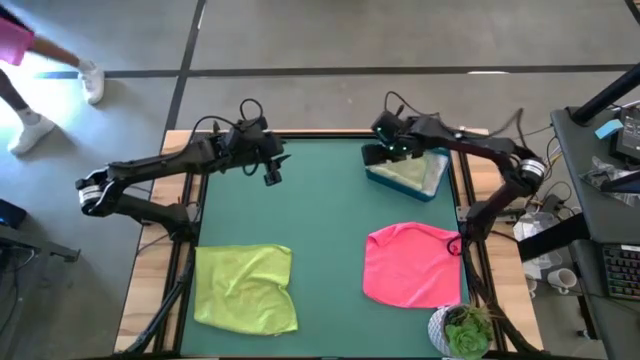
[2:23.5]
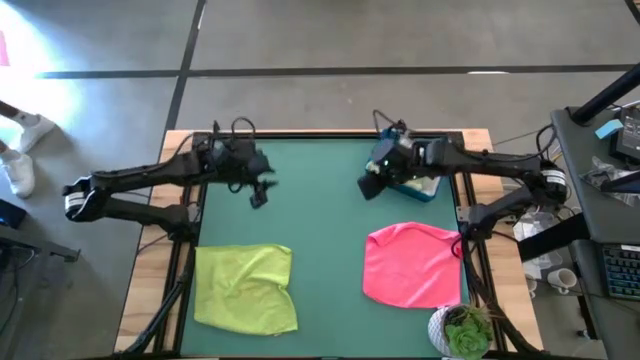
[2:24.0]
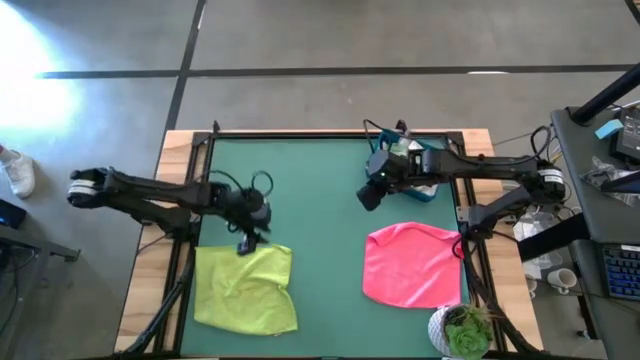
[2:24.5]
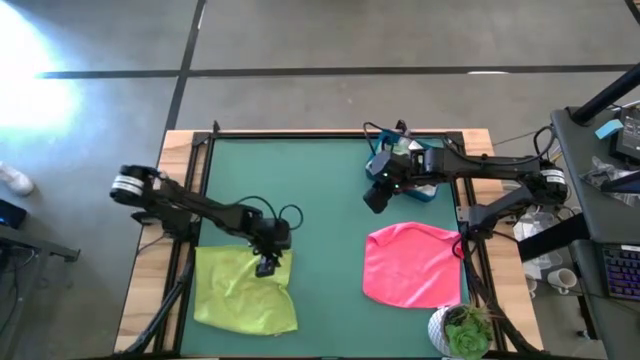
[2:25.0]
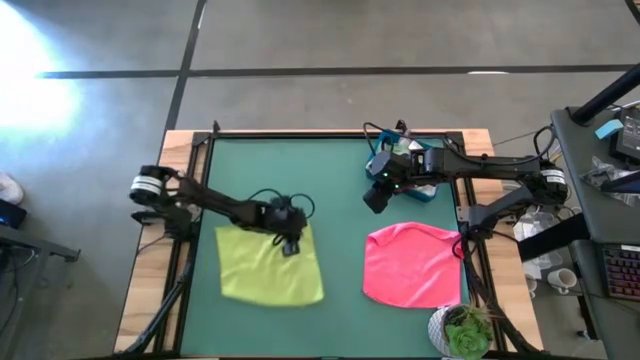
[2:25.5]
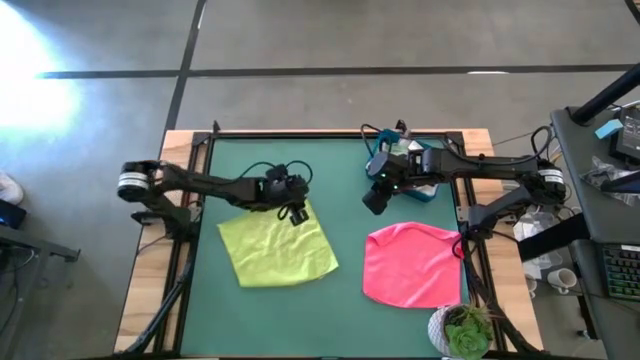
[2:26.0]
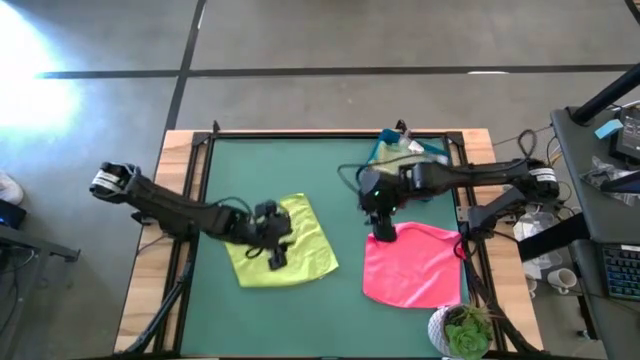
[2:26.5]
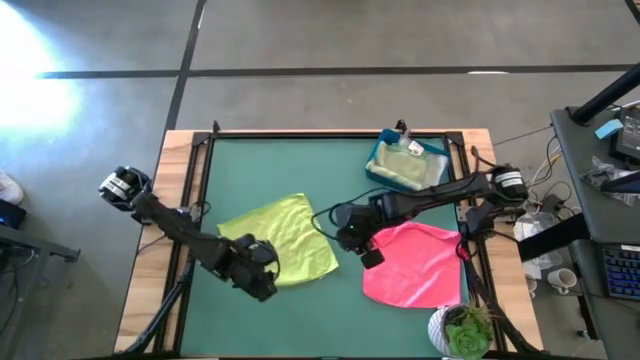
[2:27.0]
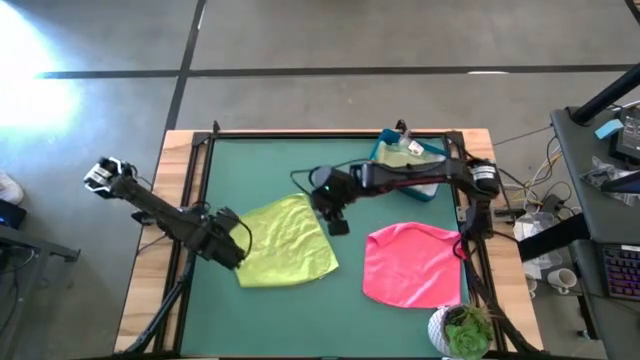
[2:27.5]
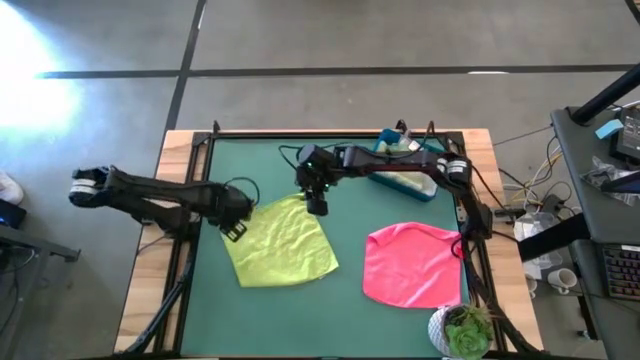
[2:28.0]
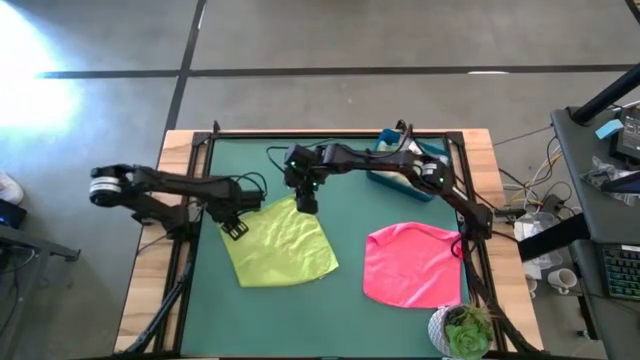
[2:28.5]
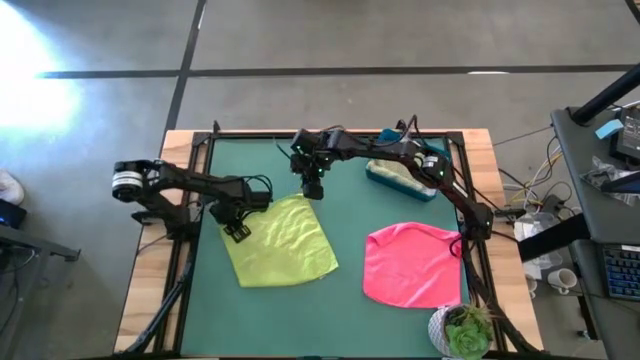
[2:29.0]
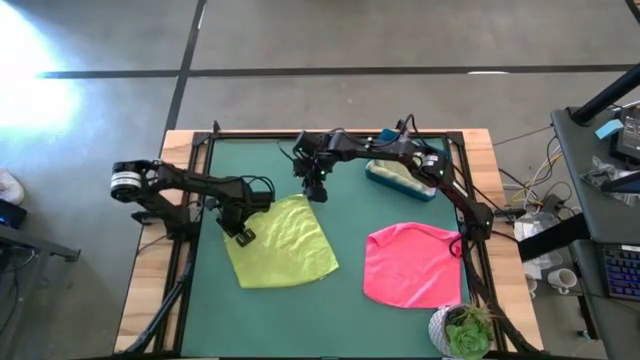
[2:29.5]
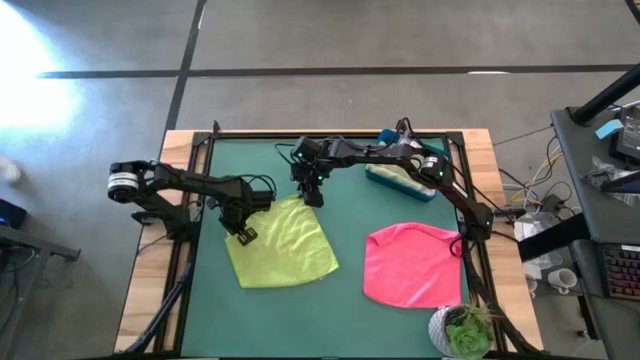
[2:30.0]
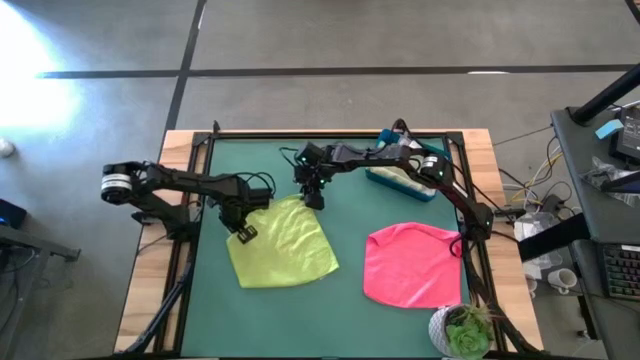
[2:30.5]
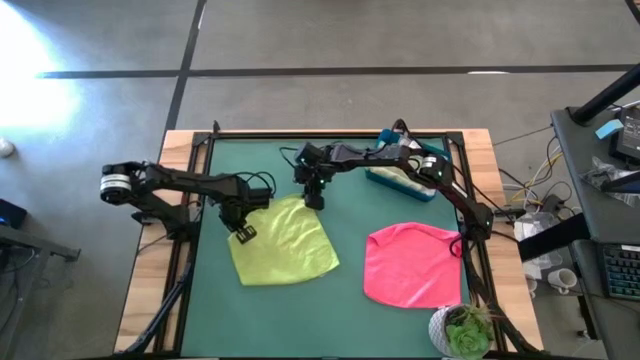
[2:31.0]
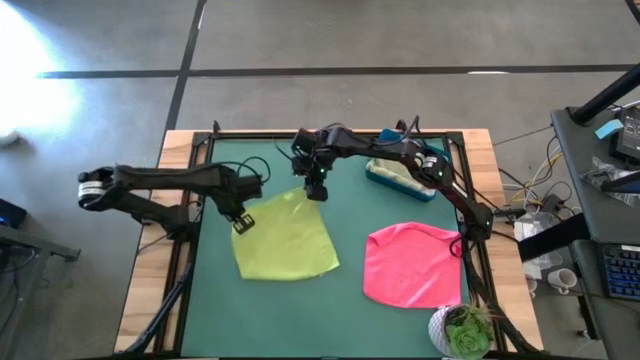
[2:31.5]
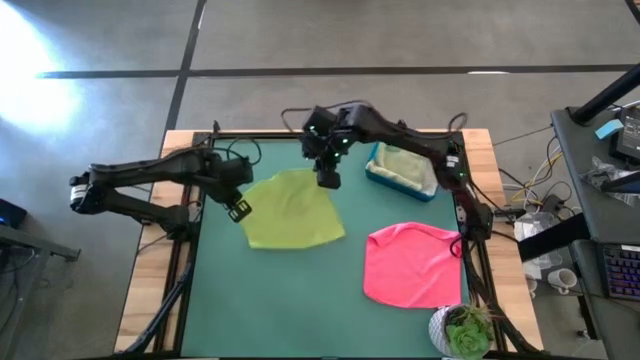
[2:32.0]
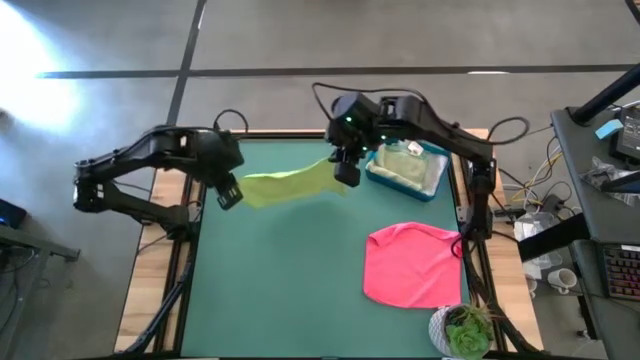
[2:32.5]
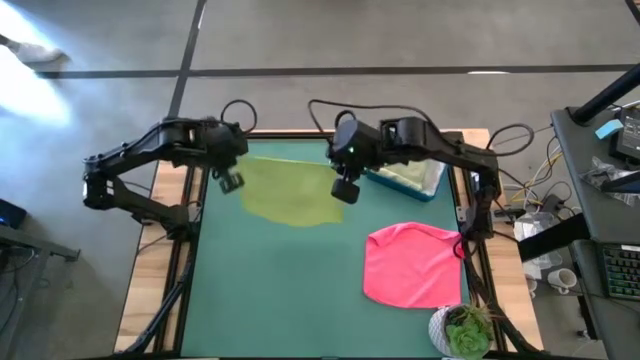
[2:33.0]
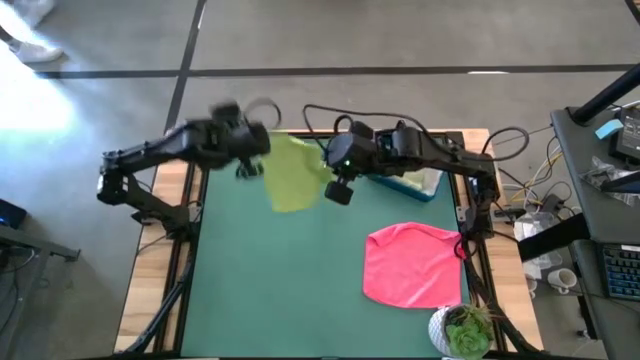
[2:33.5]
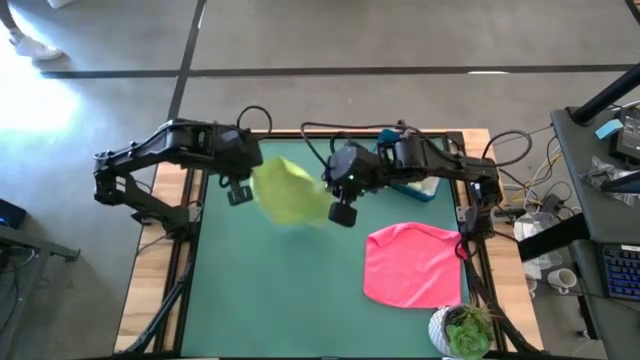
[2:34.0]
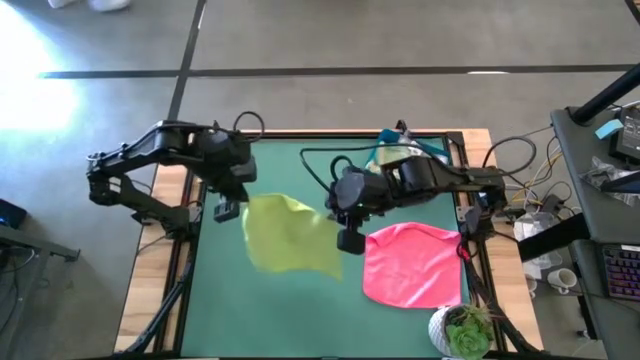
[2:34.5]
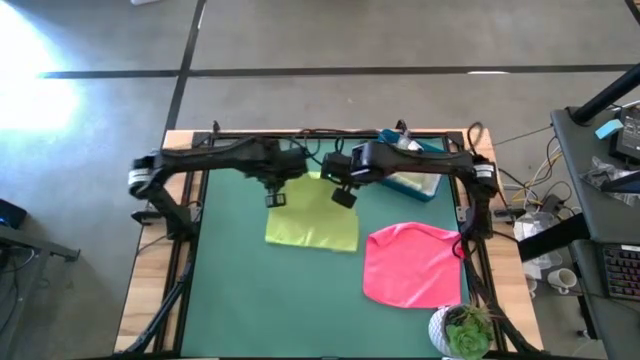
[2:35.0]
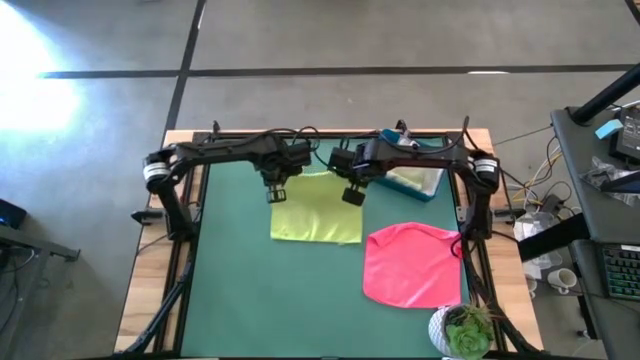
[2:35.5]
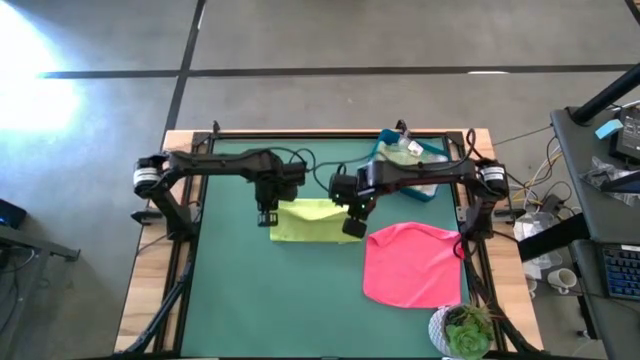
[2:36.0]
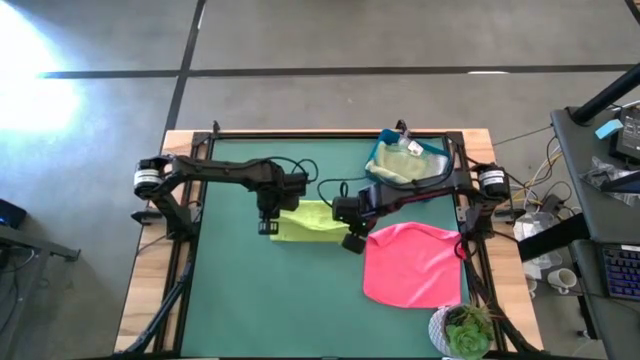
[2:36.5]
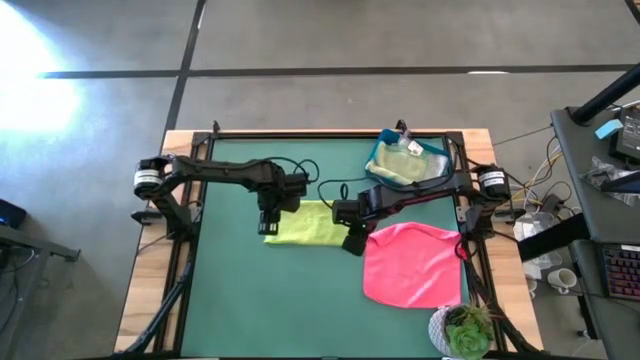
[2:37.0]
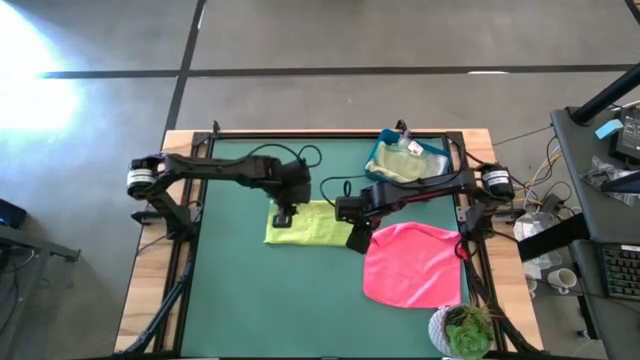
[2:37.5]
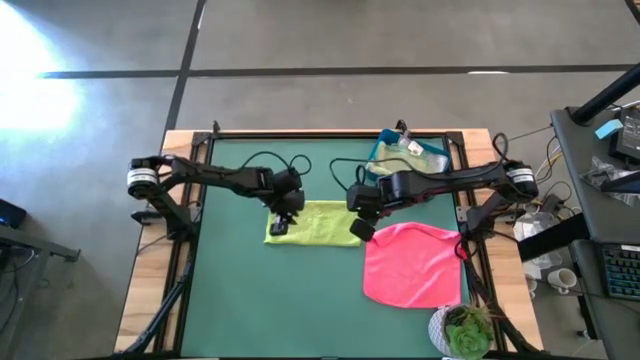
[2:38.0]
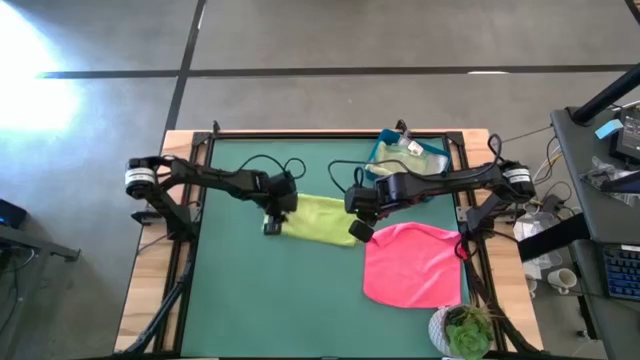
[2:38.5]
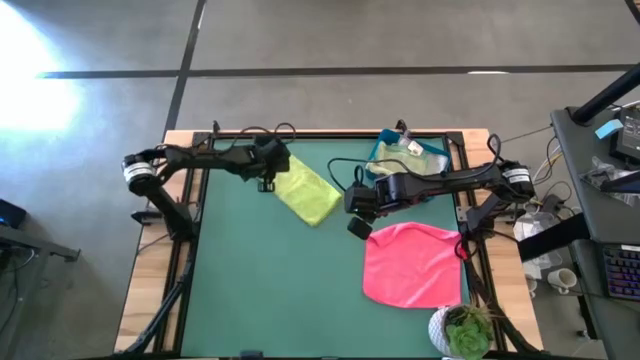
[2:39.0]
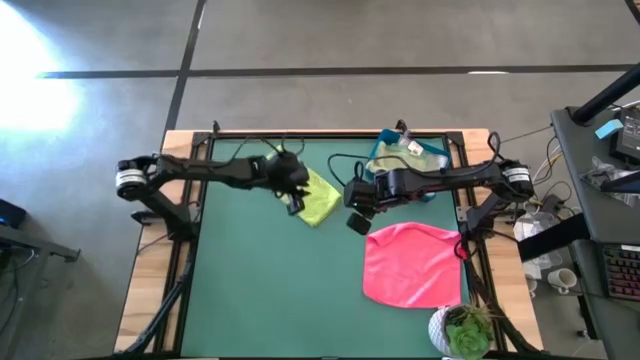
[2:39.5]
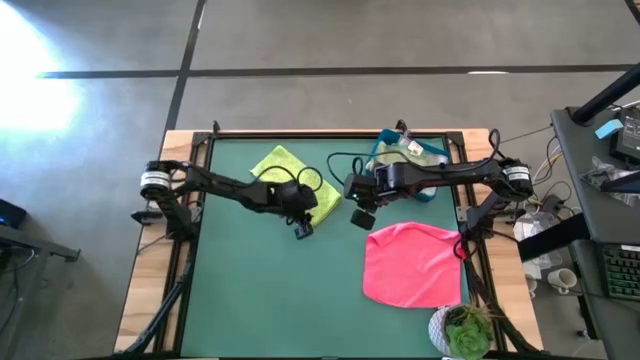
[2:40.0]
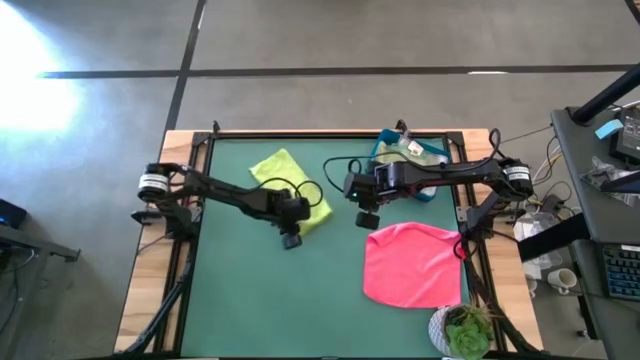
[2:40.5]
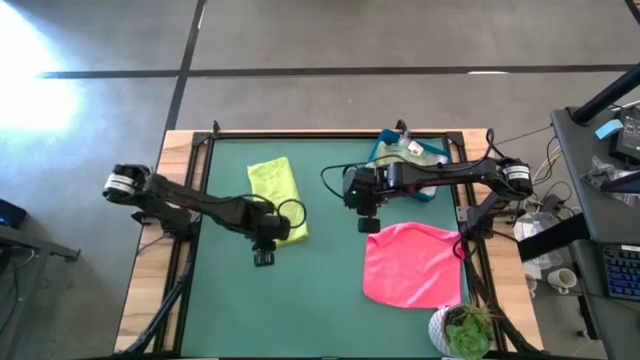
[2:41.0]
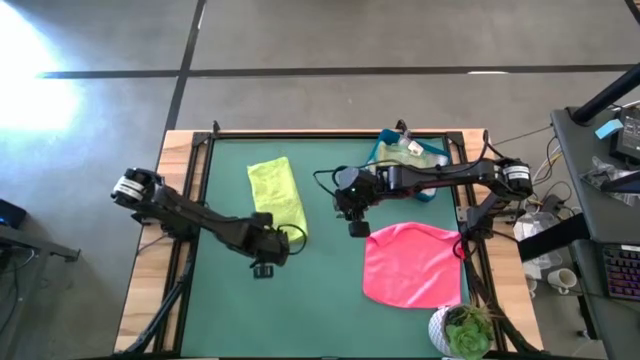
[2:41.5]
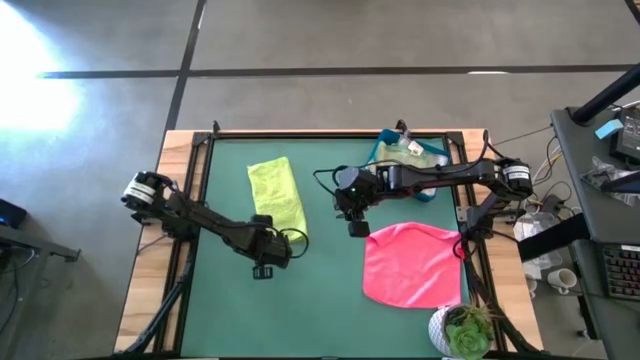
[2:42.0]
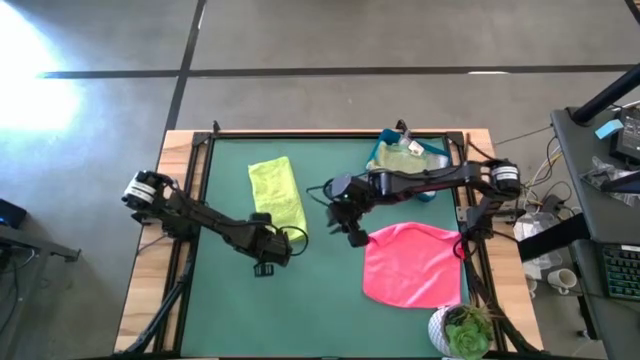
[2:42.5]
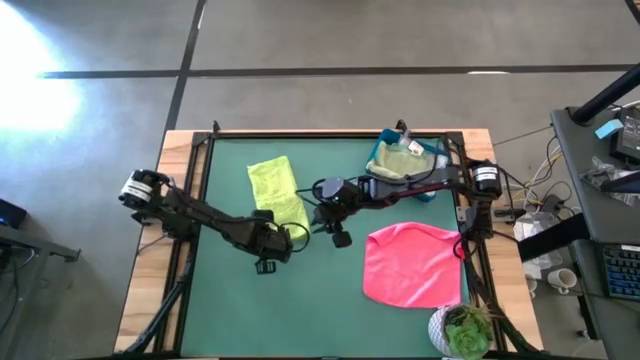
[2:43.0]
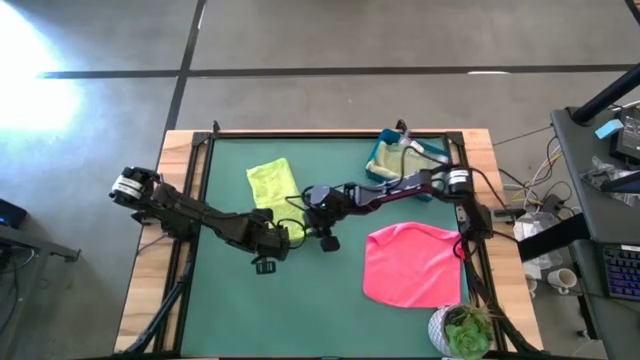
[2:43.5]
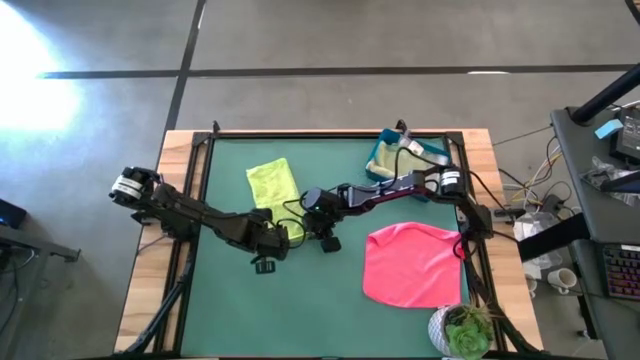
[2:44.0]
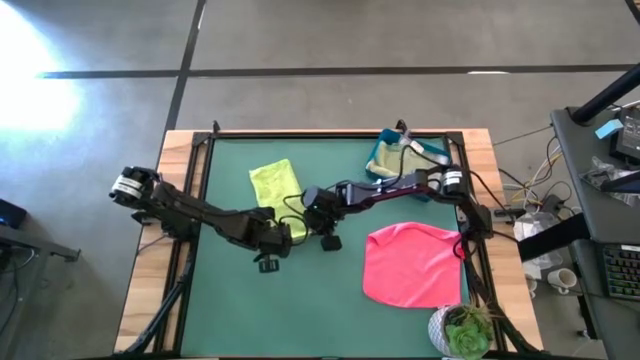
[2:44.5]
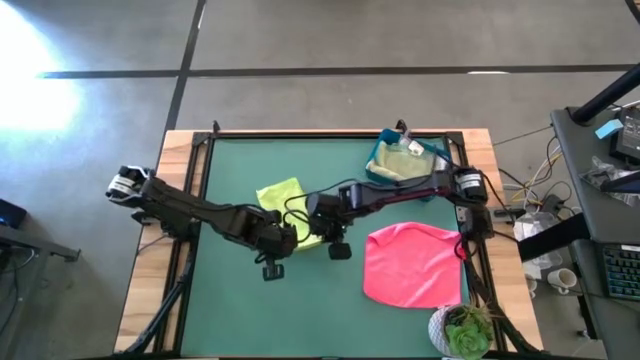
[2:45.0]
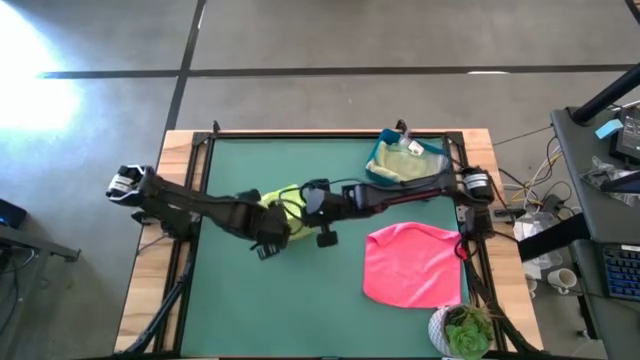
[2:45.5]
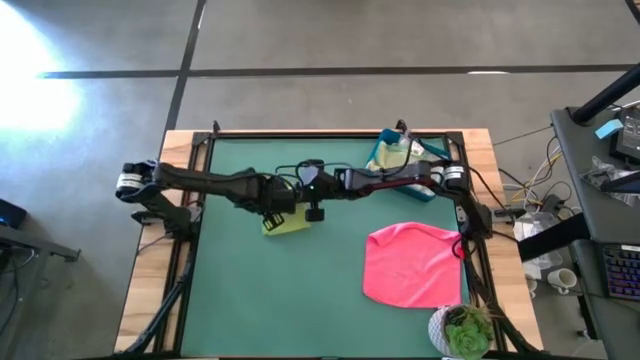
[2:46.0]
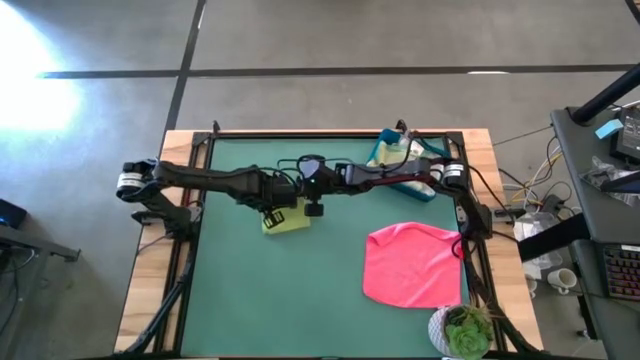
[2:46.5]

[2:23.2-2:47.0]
Task: Fold microfiber towels
Fold the green microfiber cloth
